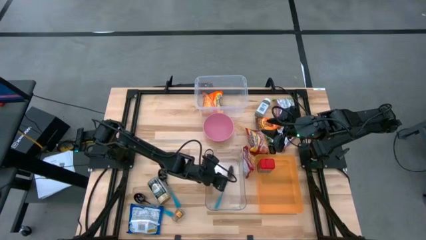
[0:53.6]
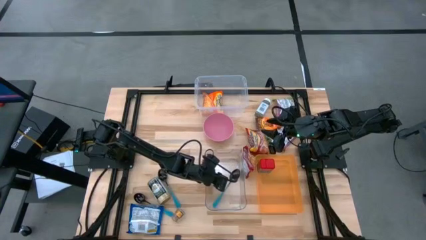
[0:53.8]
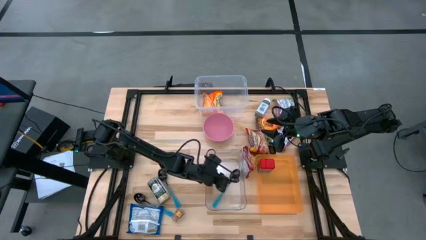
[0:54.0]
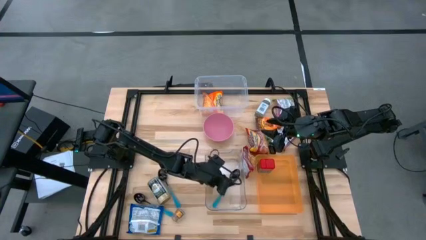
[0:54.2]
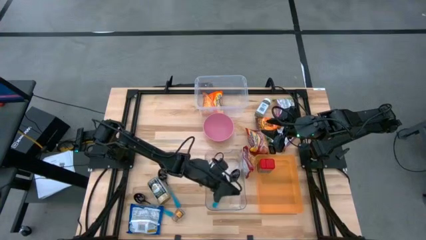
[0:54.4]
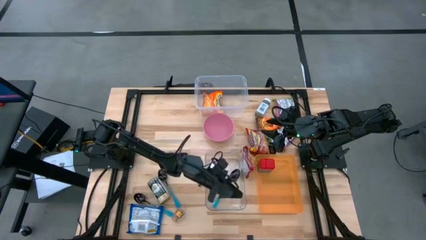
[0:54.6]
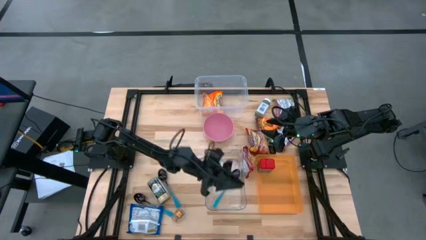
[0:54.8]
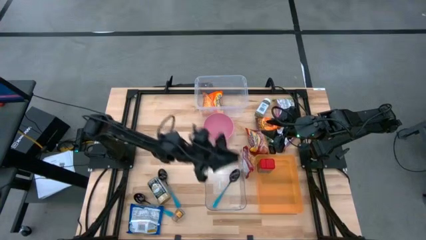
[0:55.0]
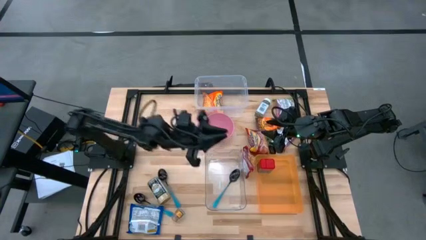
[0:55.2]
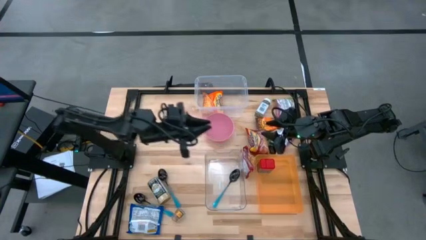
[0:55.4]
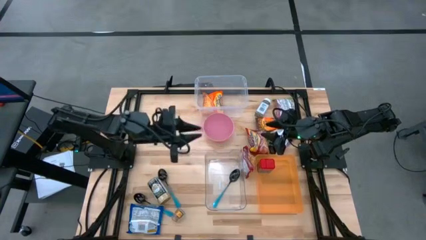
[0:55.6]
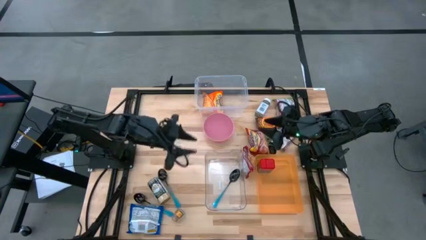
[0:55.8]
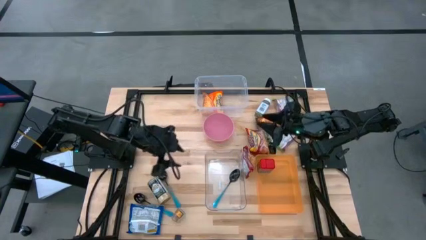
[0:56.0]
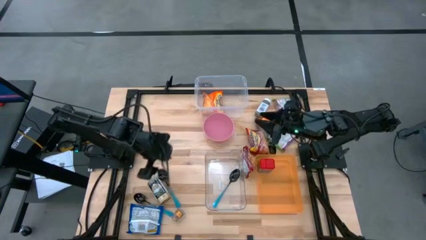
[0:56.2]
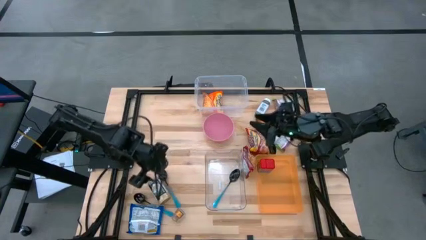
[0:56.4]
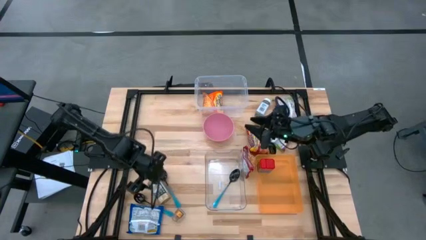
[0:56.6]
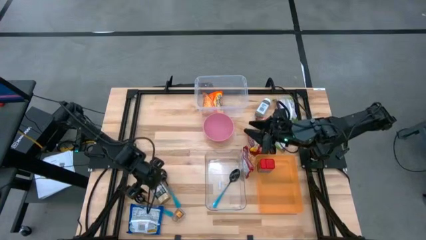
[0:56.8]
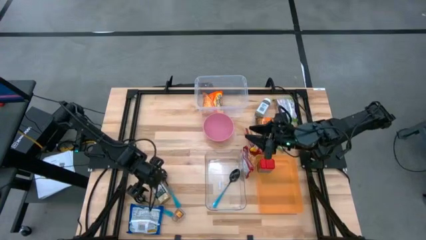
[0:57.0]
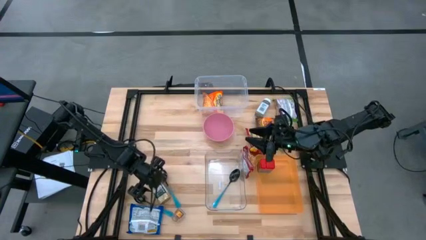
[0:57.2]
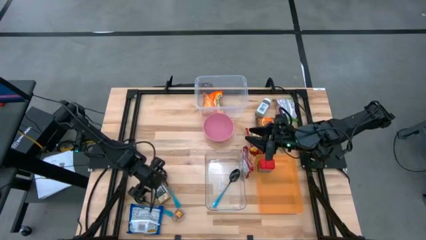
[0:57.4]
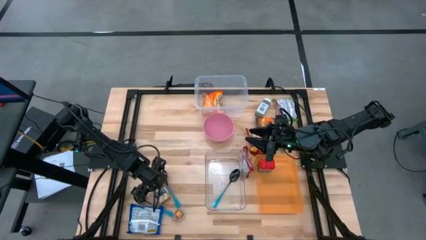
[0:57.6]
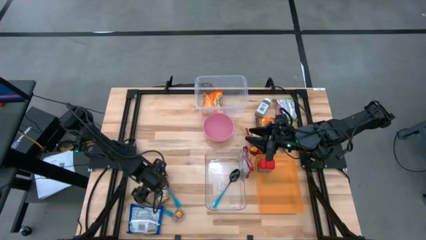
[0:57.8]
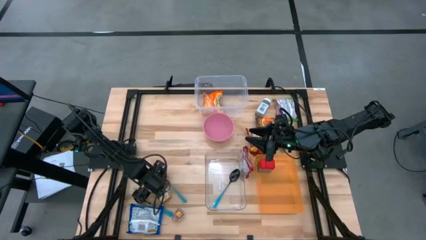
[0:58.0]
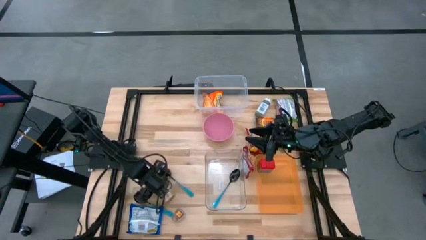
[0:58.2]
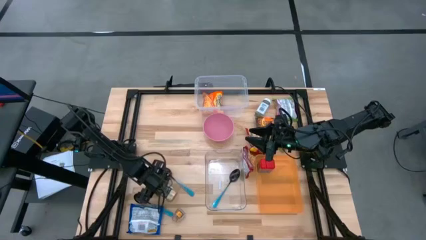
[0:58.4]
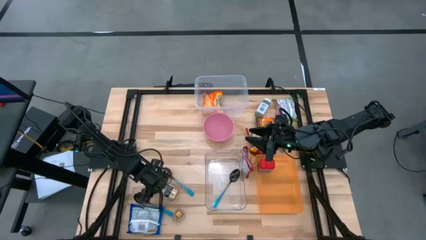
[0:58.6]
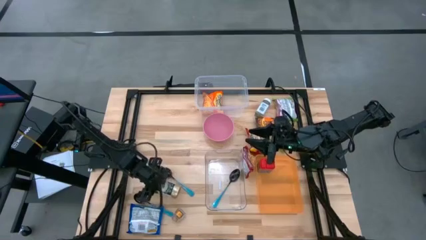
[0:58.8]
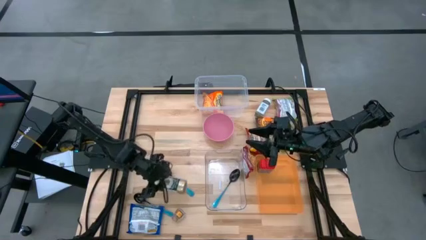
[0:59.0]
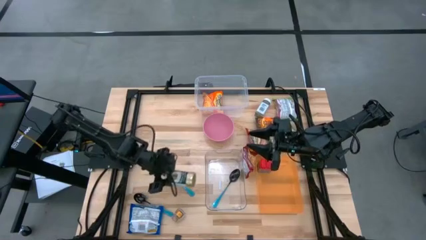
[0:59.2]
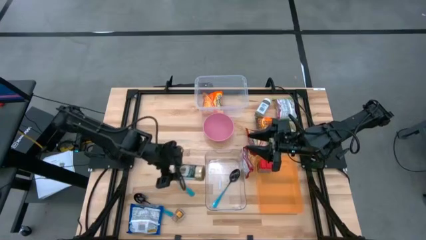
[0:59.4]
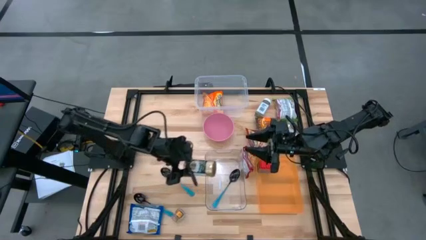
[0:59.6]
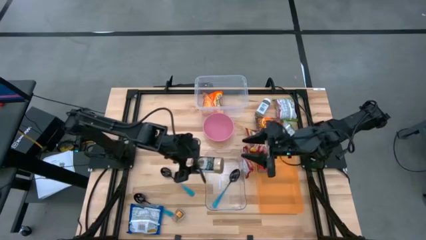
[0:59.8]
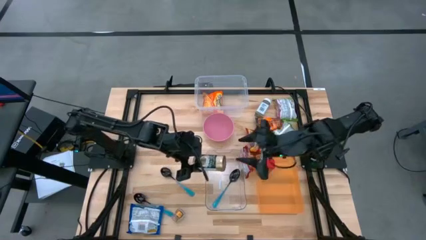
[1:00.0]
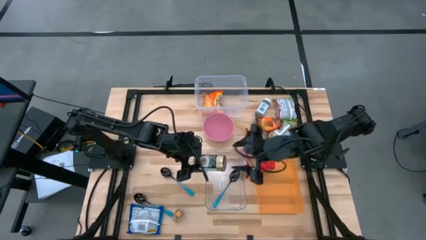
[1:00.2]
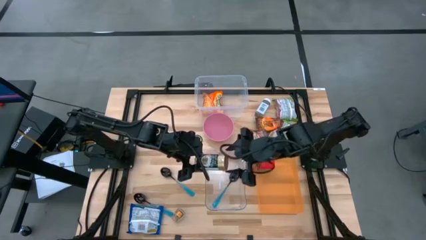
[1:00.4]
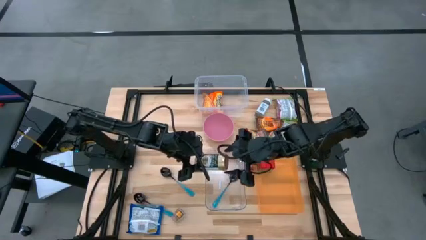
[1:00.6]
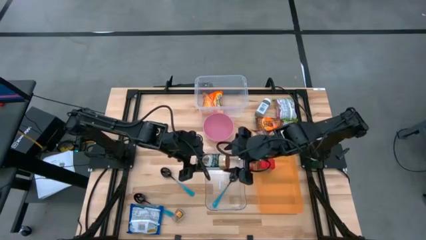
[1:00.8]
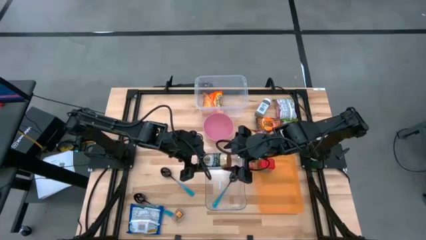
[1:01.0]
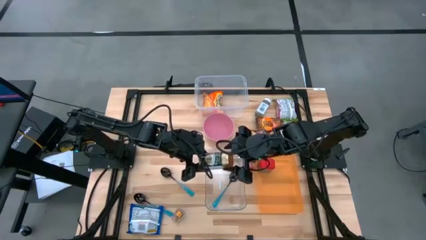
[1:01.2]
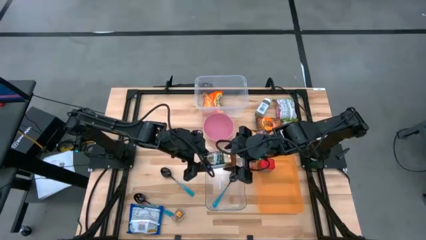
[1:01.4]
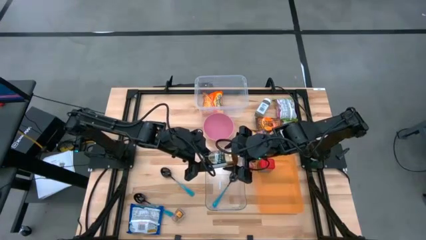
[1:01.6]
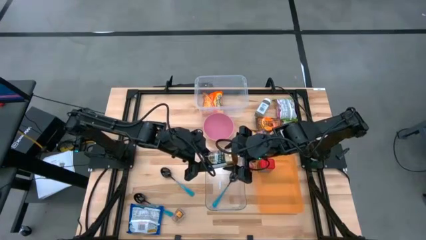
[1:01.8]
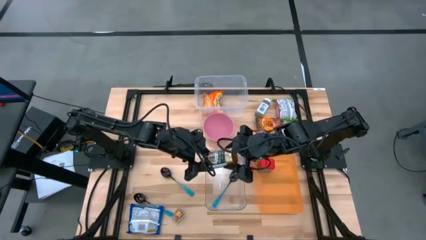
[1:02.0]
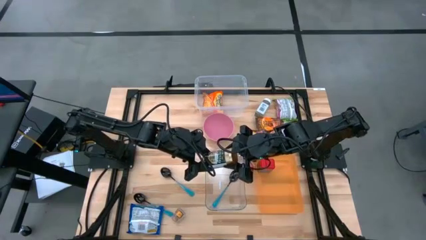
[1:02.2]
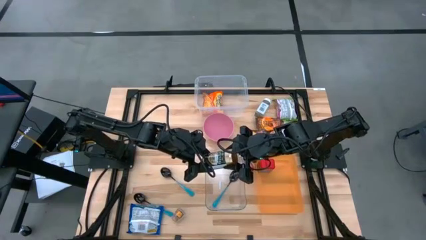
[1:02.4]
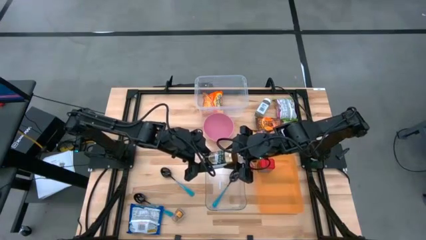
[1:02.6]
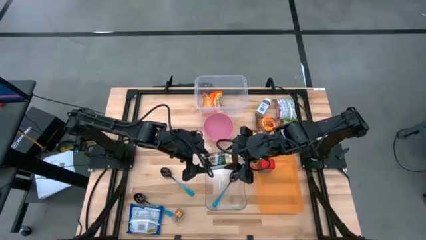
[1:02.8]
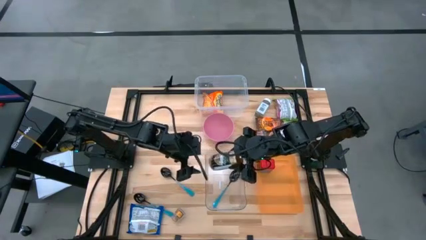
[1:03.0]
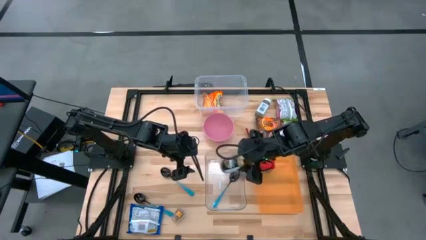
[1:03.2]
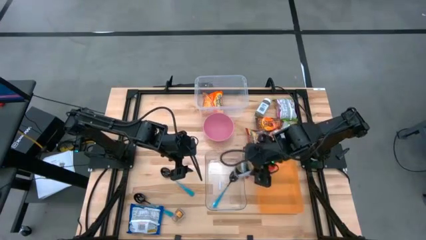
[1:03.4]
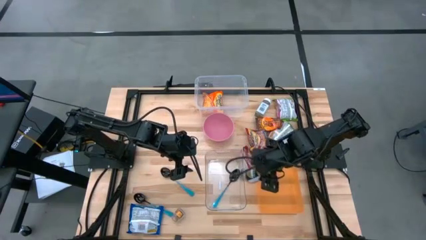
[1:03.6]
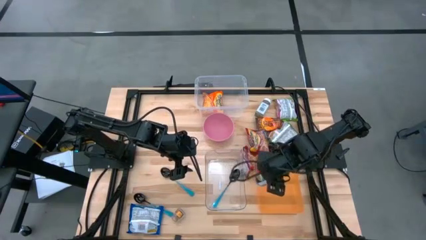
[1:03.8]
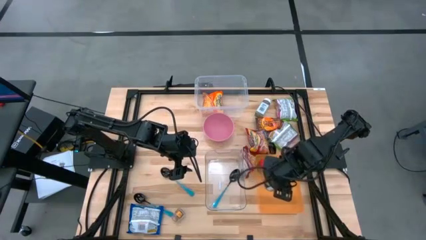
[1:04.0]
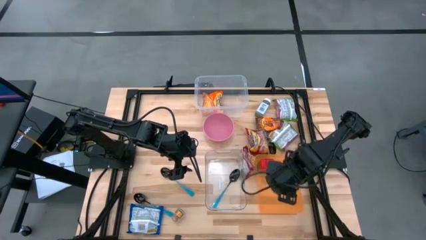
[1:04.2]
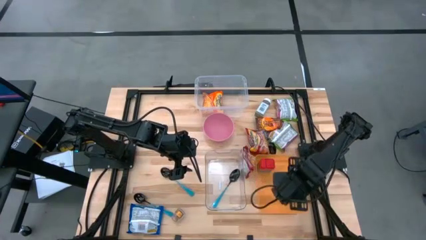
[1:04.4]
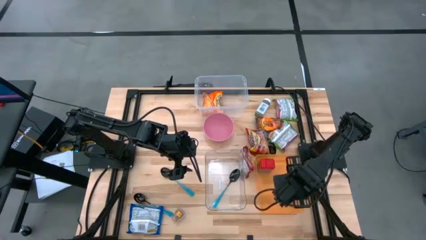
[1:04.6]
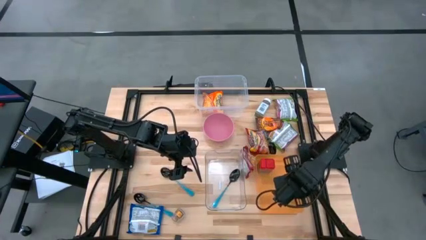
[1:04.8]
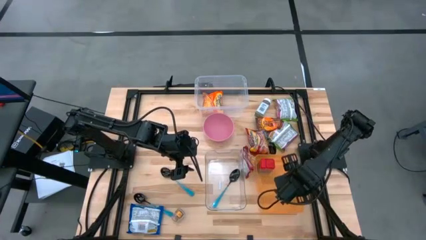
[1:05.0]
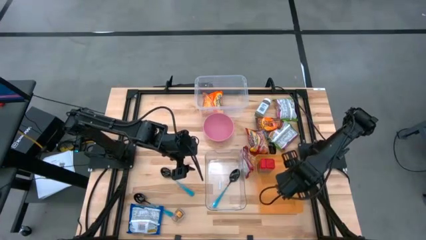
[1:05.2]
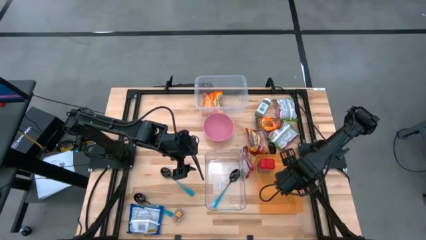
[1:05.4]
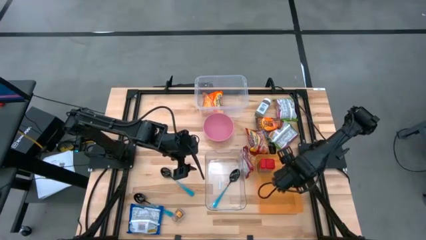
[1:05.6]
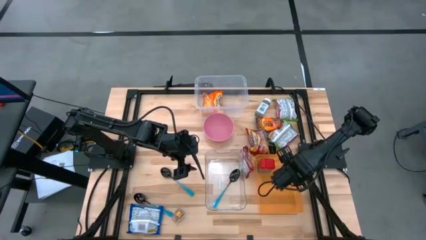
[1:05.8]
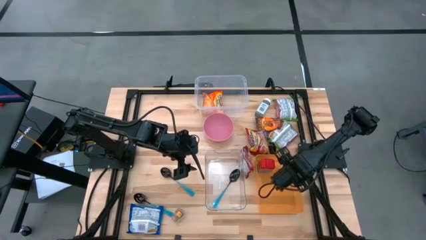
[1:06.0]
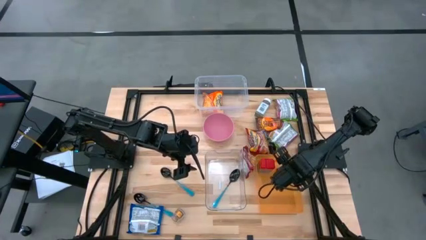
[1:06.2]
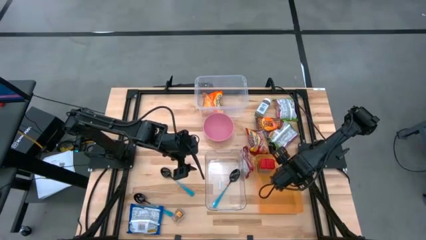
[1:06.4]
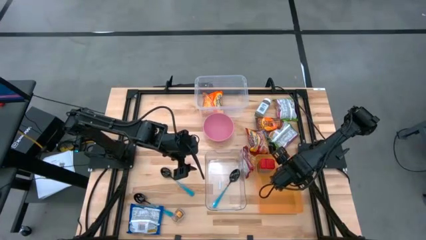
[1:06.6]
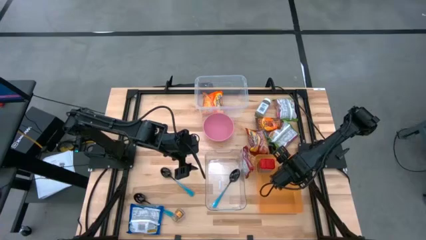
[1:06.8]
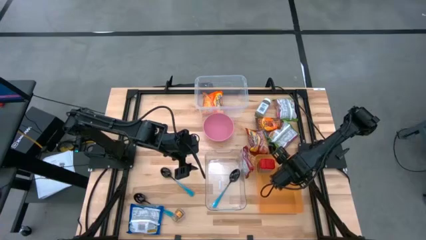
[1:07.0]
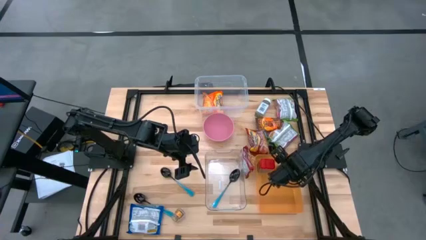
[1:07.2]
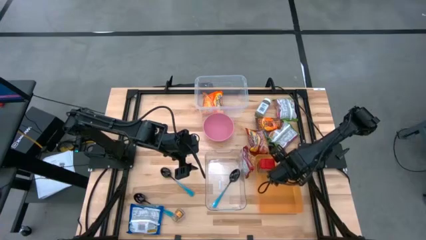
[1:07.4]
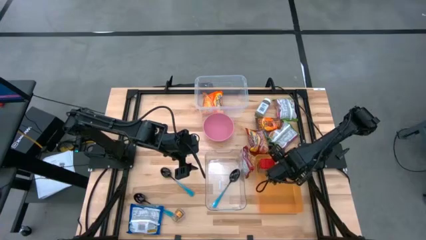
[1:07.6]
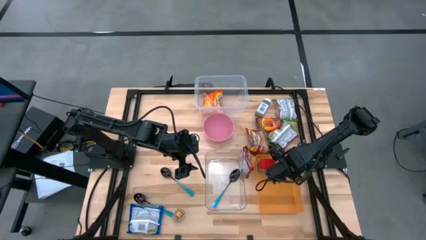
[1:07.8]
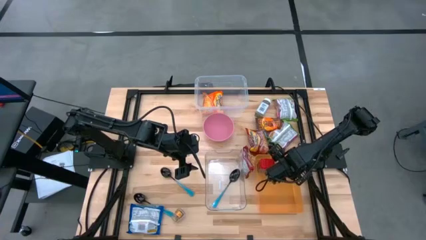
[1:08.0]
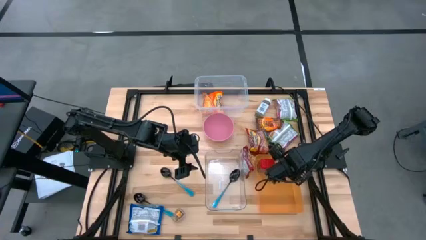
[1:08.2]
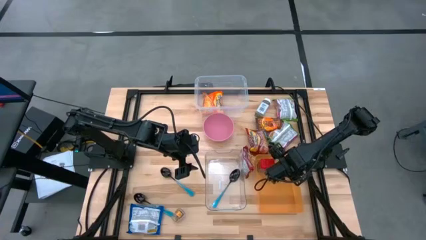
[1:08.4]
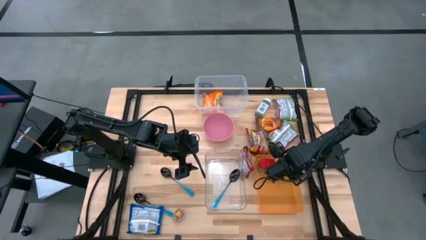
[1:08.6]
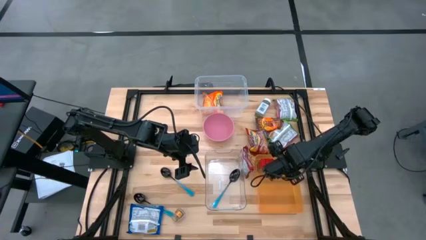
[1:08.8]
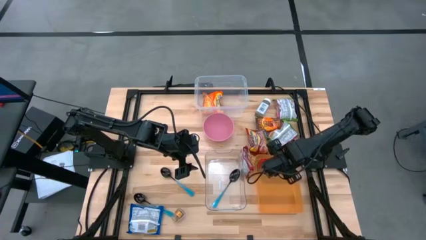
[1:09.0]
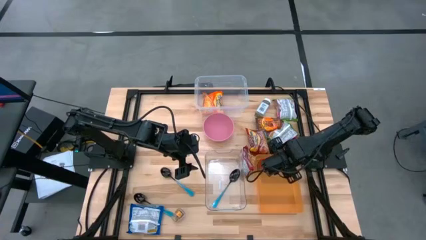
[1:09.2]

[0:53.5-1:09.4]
Task: Pick & Place Food Item
Put the gold seasoning bottle into the orange bin

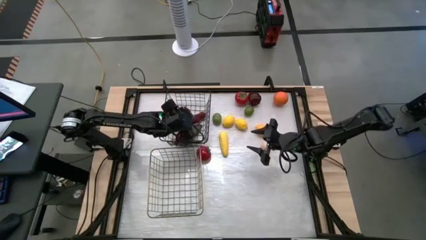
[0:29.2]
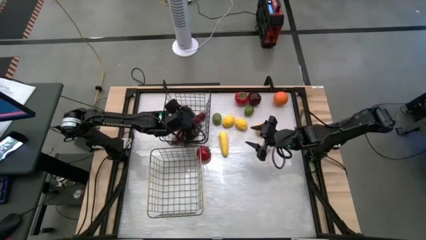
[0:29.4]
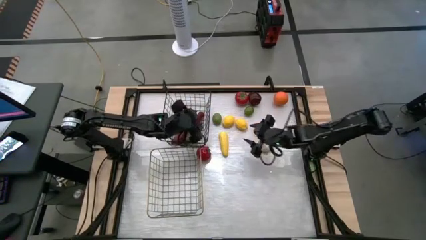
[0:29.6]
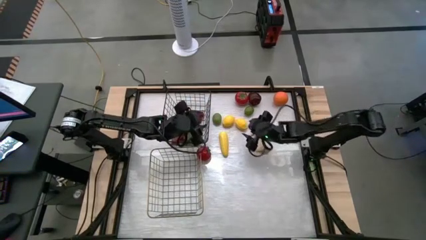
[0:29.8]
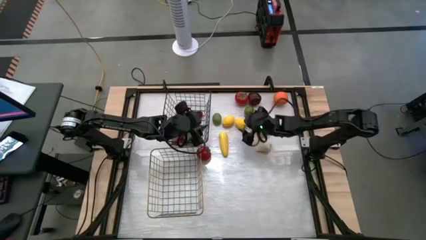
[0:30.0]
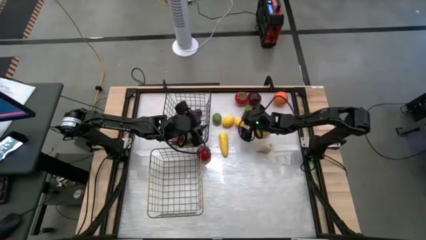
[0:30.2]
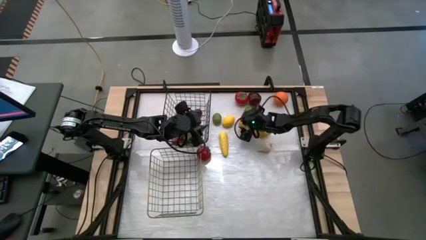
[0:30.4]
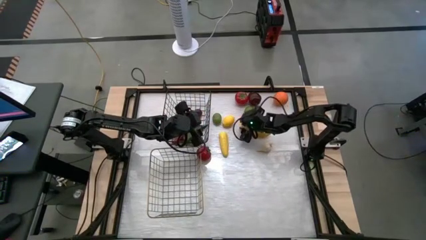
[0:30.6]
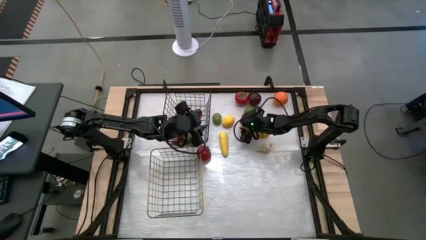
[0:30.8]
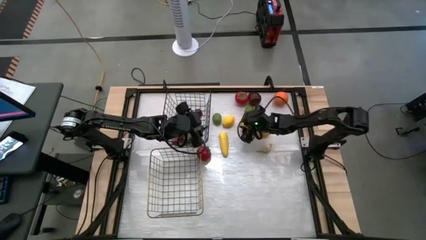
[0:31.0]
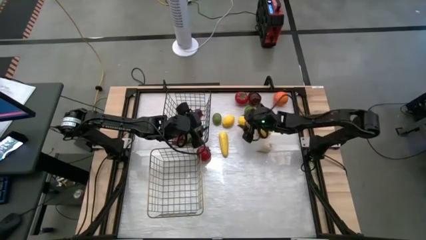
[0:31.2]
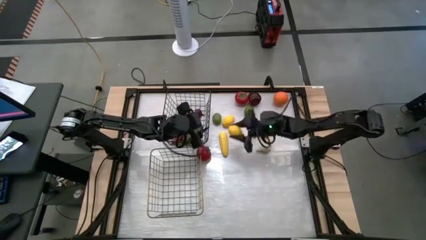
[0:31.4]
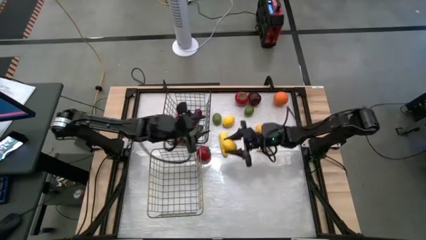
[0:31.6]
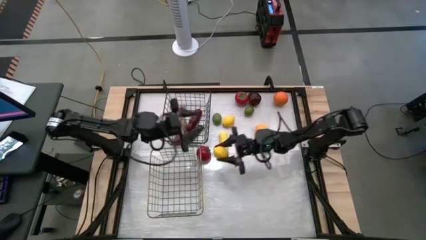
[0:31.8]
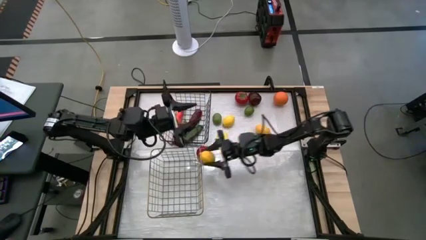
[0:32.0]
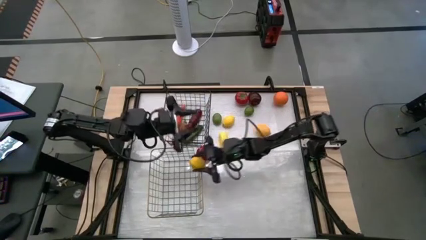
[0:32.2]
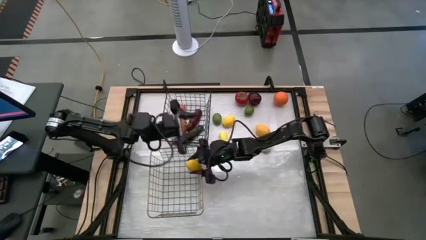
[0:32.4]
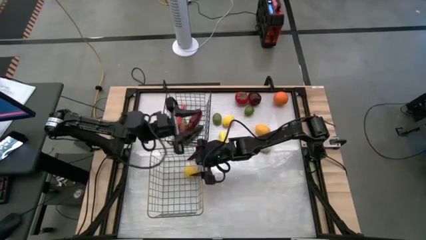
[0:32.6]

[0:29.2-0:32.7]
Task: Sort produce into baskets
Put the middle yellow lemon into the gold wire basket
